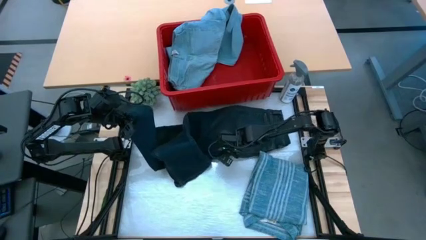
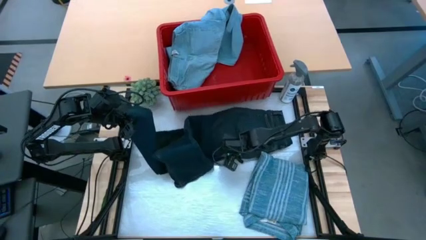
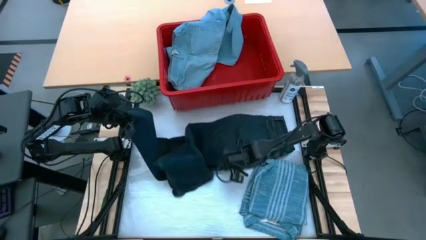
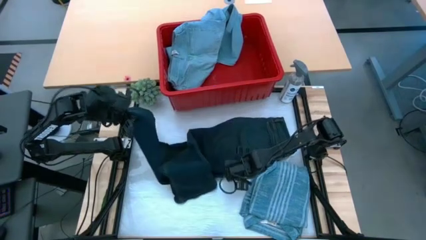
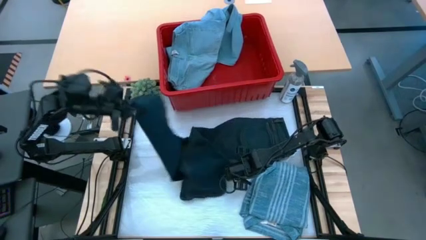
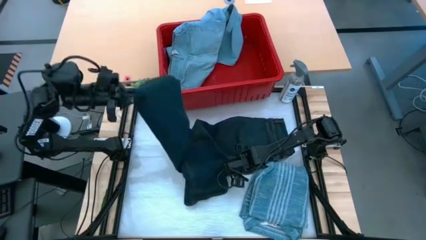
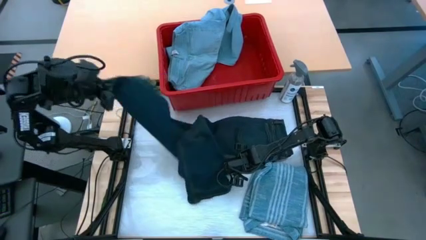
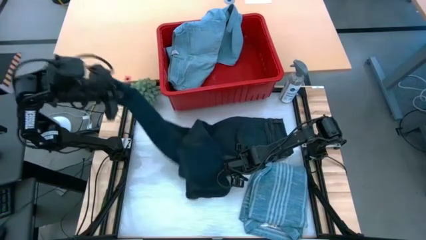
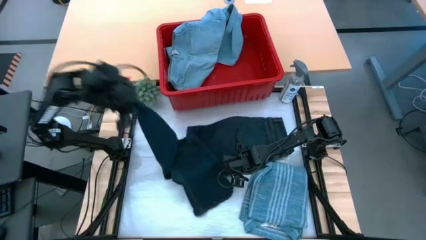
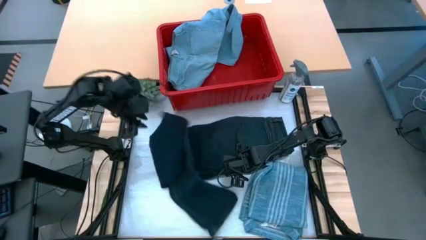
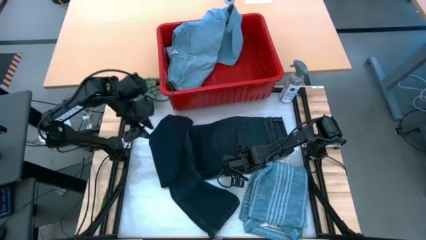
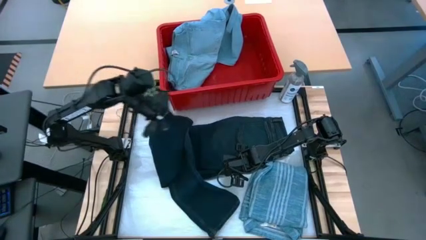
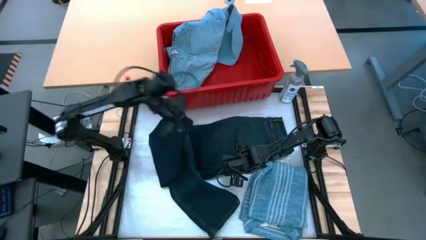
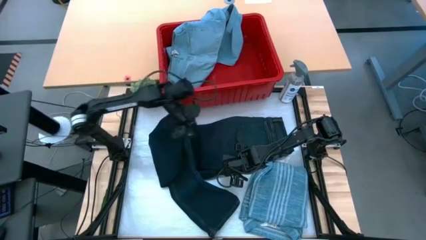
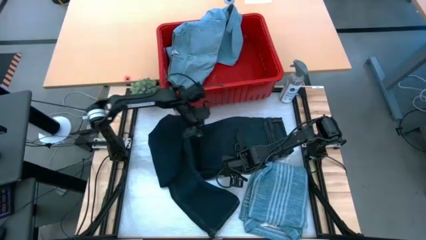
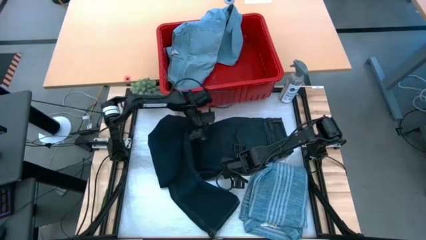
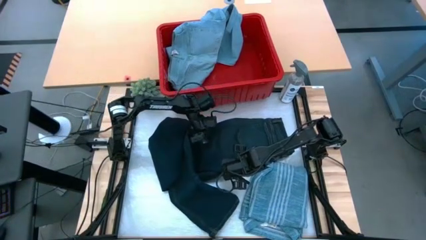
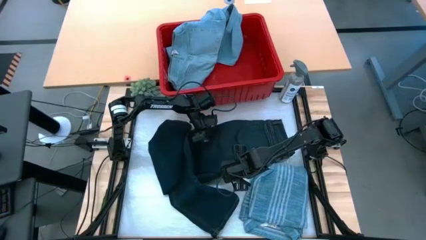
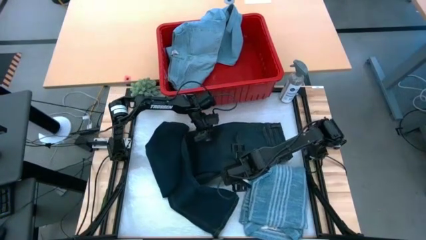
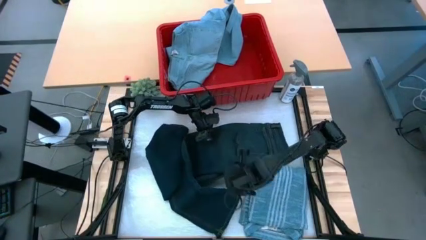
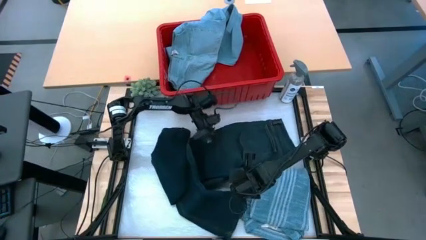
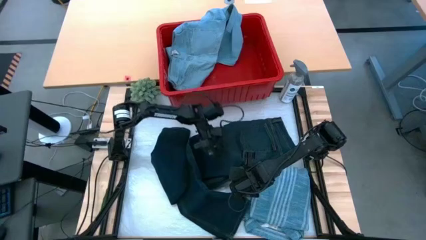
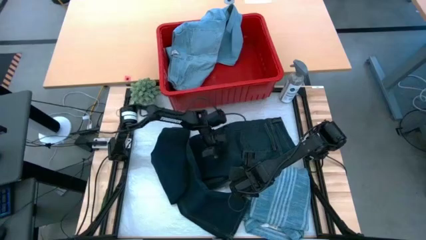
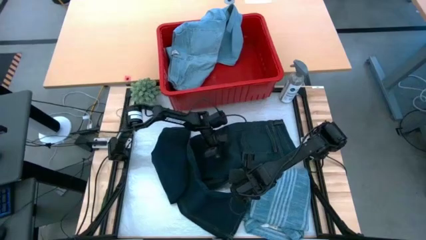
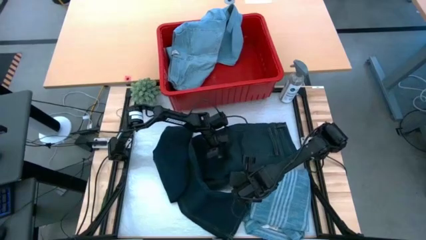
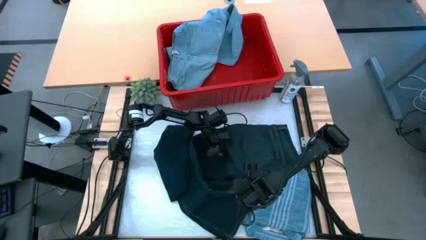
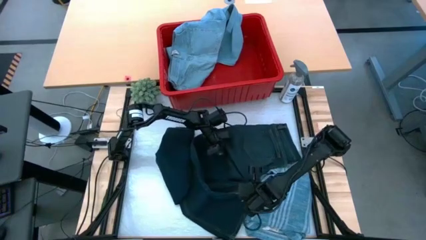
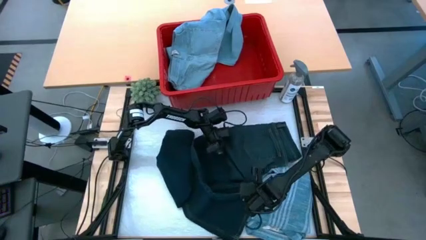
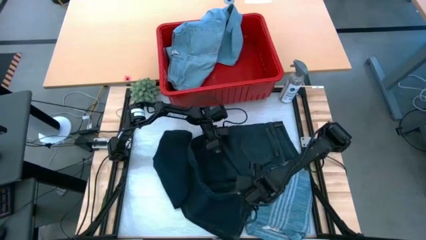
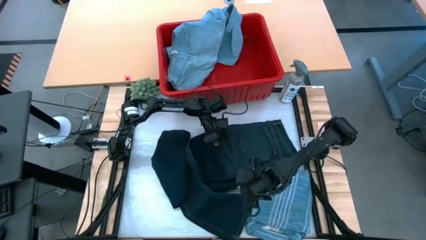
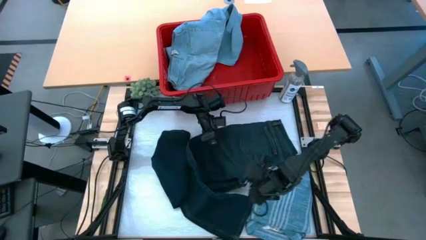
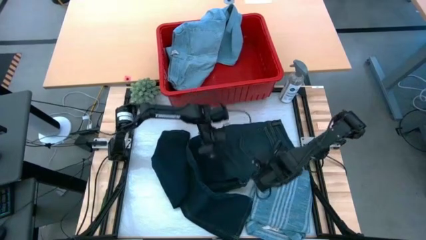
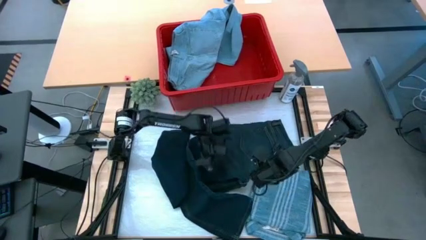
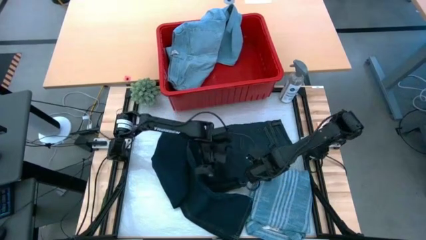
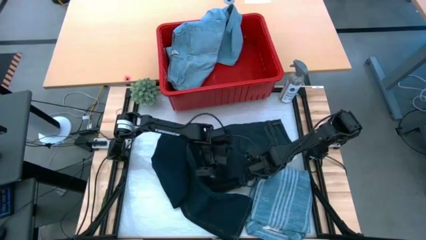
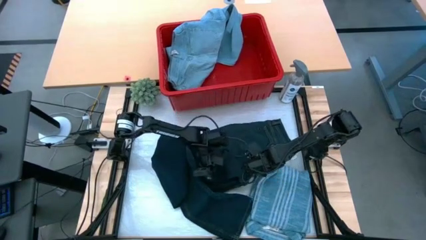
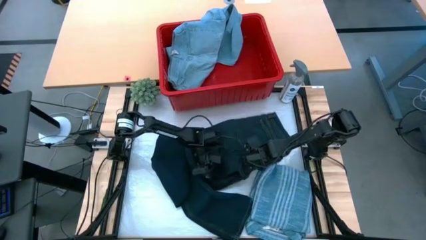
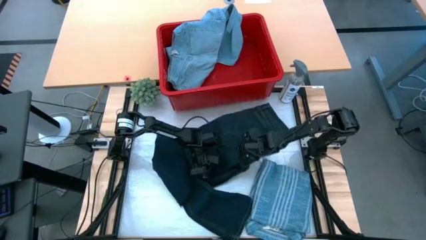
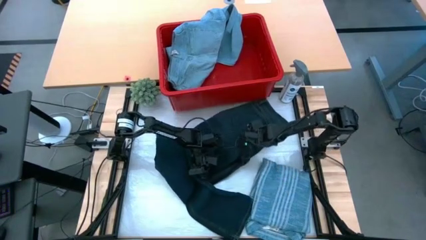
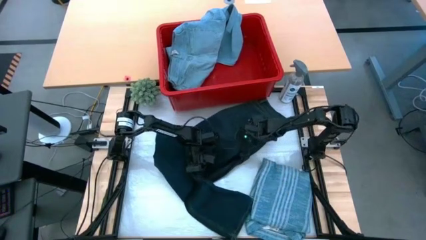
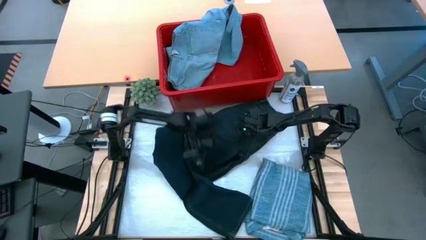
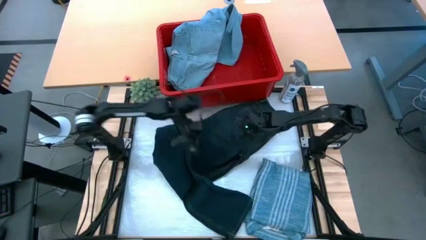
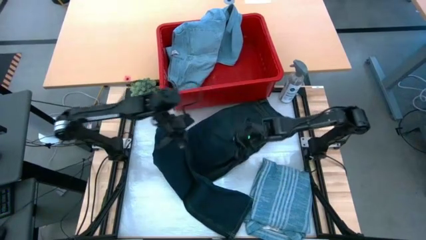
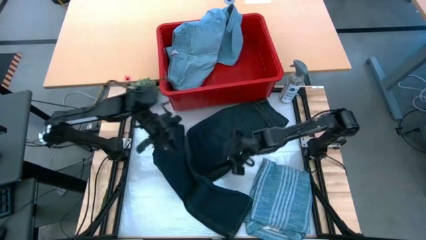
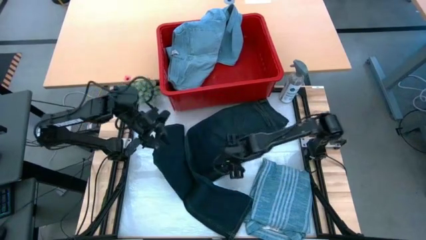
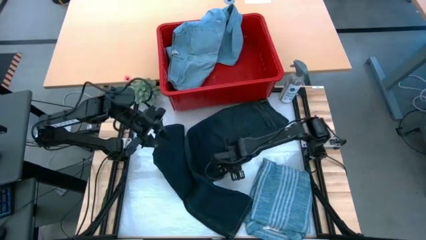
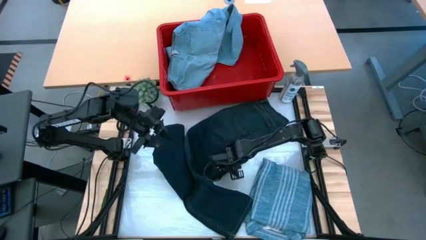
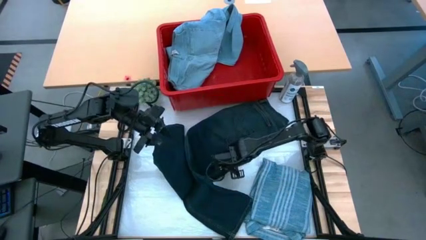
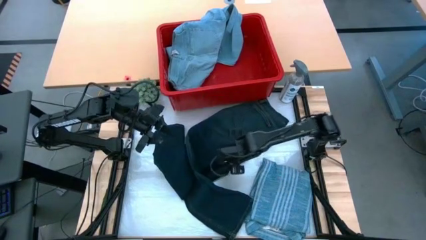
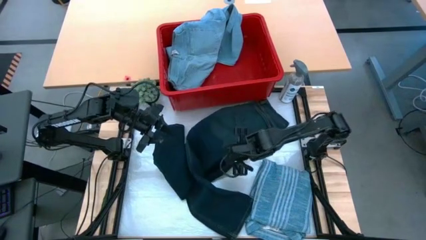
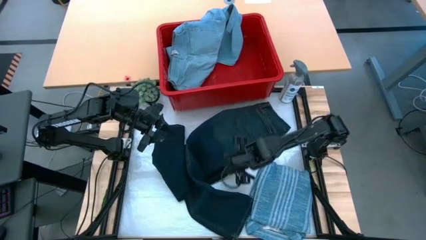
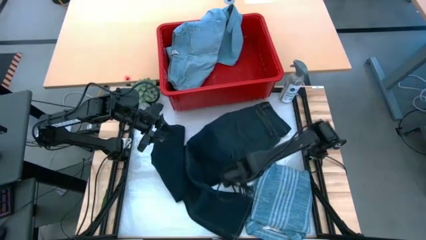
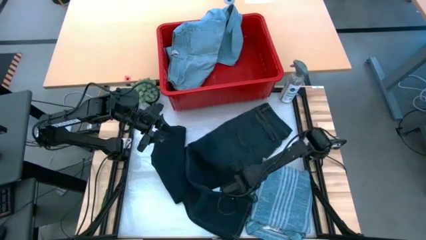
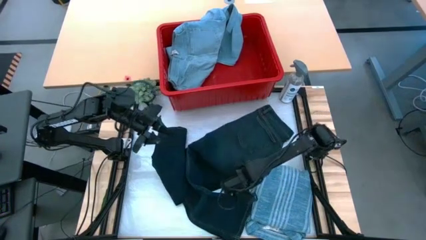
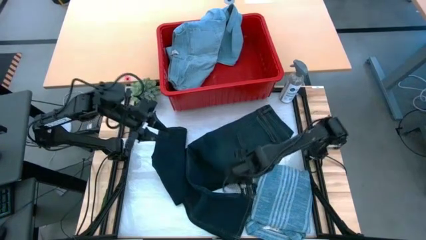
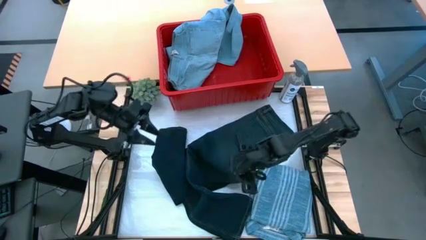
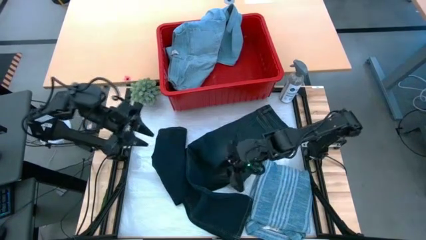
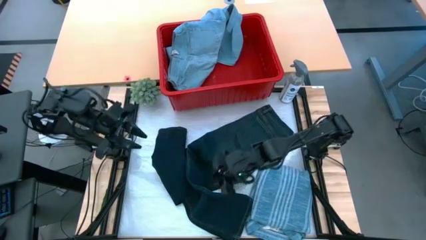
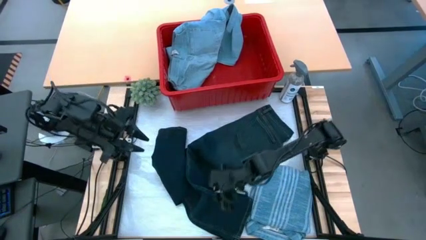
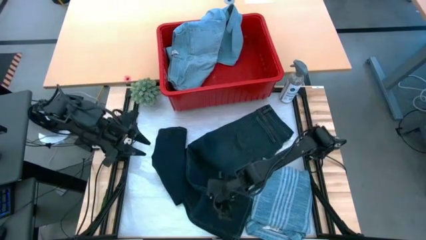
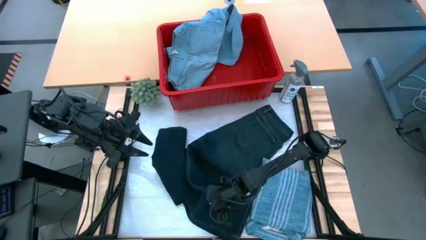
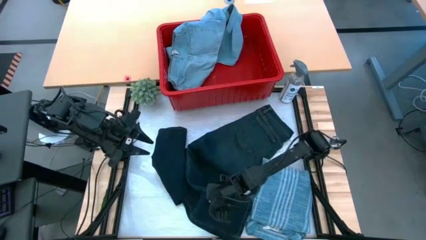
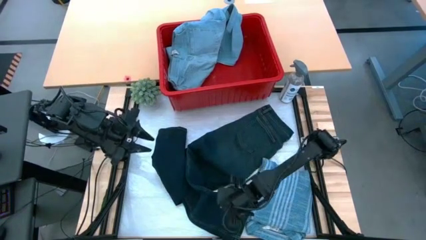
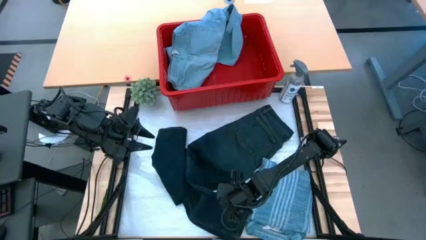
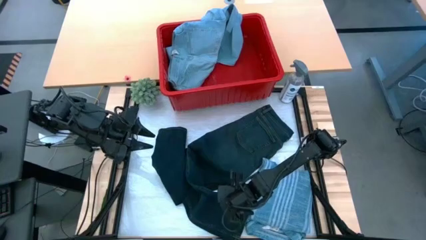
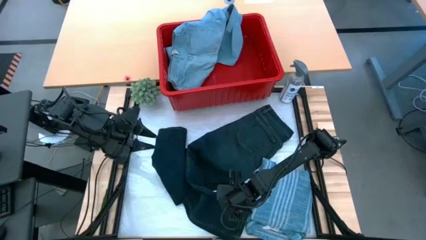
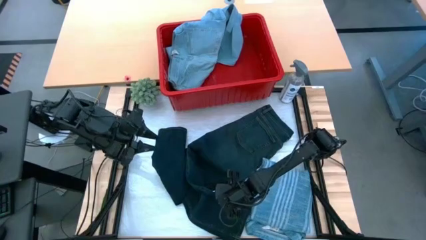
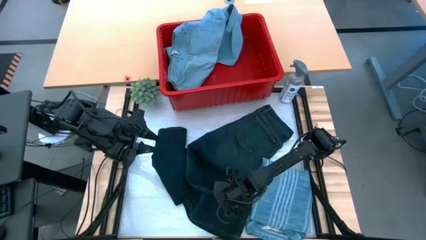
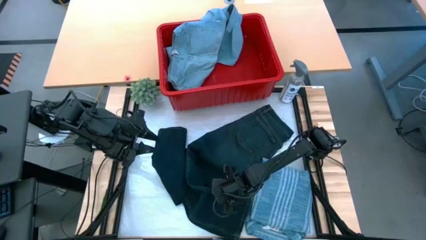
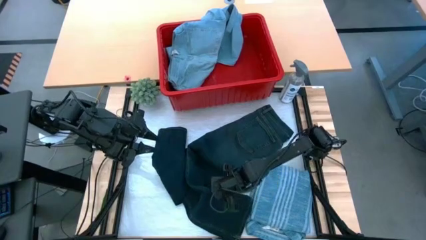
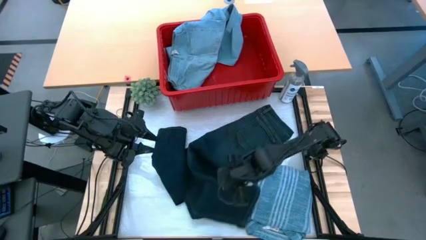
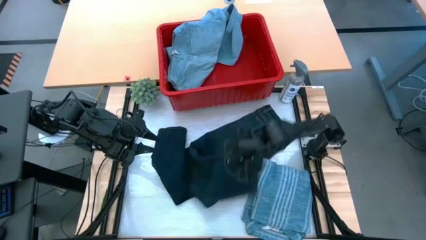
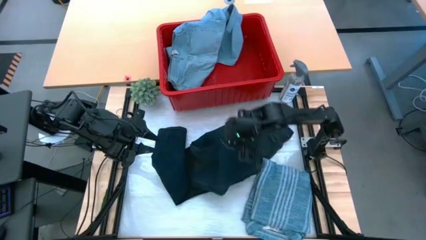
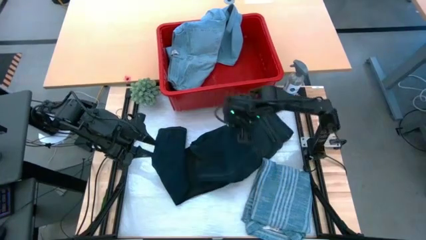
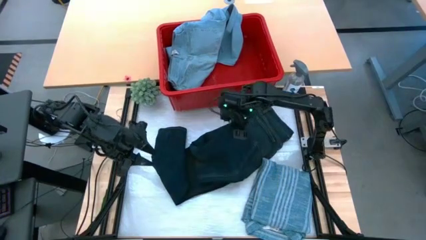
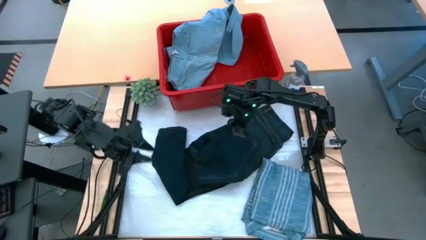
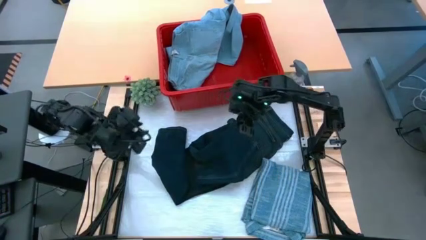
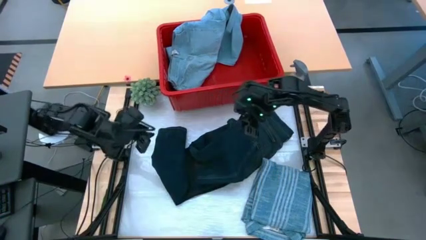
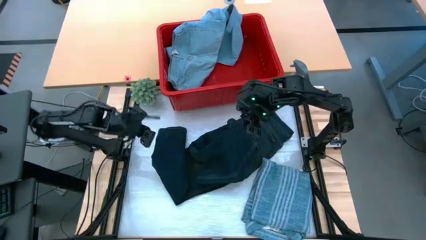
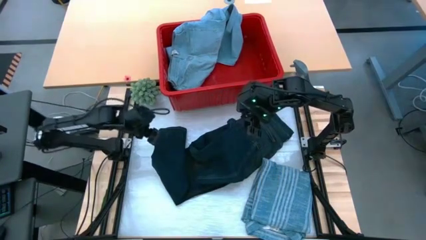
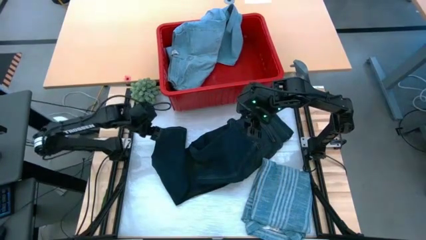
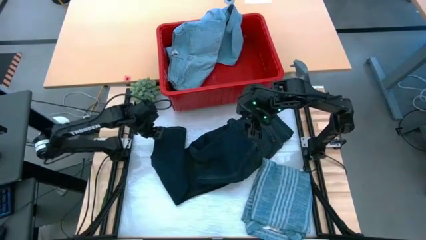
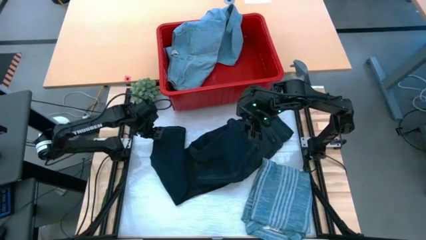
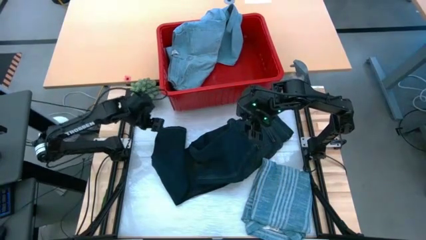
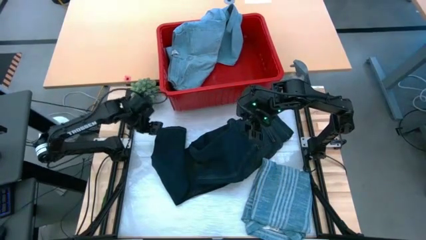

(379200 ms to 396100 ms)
Task: Fold Laundry from Bin
Fold the blue denim pants
